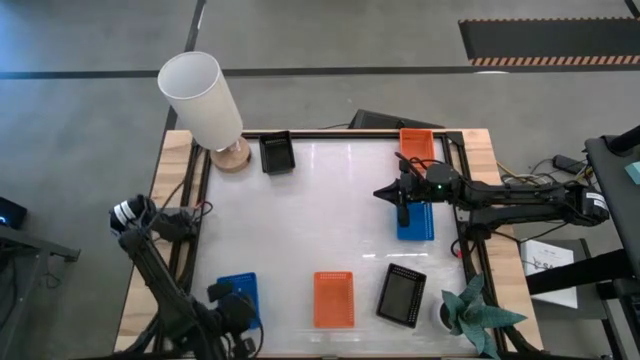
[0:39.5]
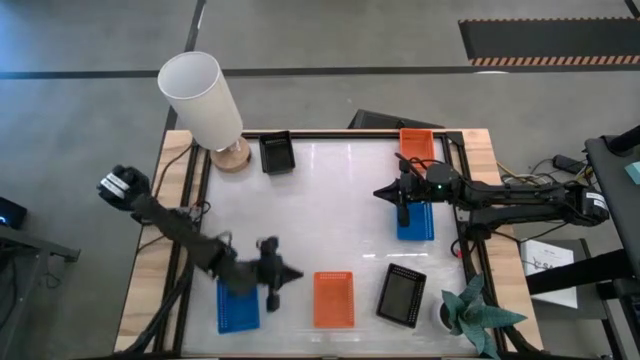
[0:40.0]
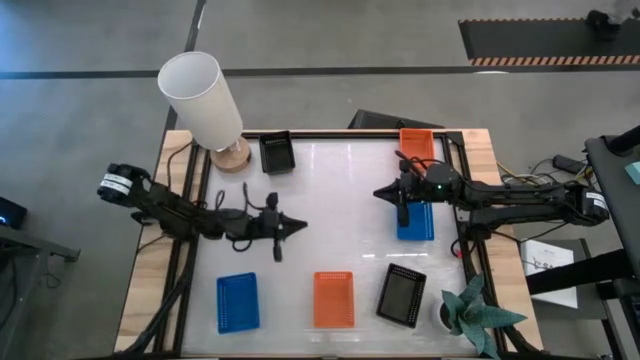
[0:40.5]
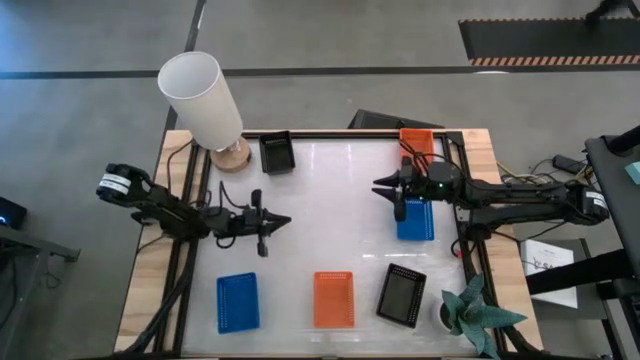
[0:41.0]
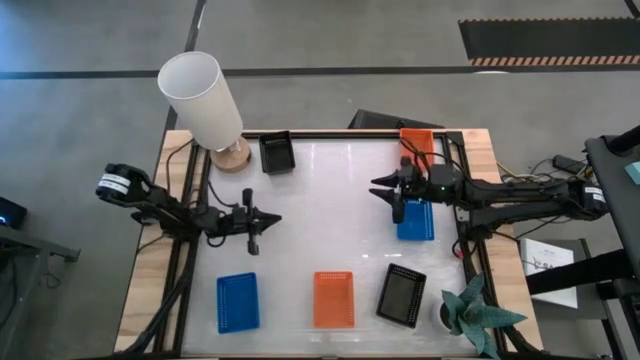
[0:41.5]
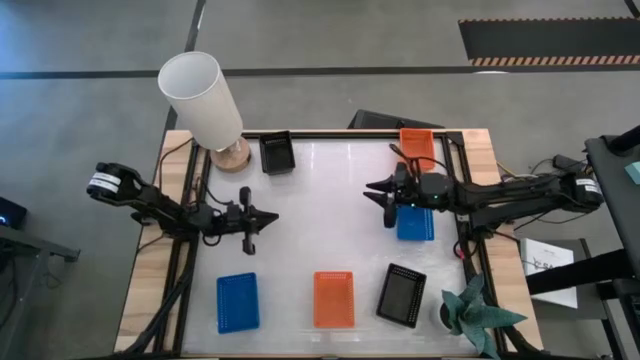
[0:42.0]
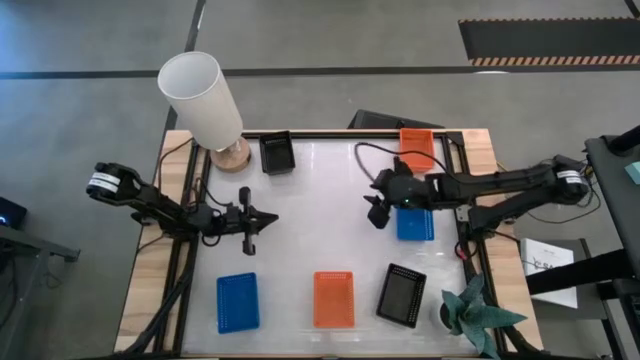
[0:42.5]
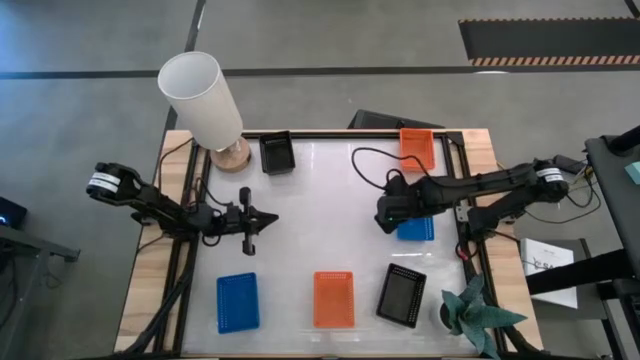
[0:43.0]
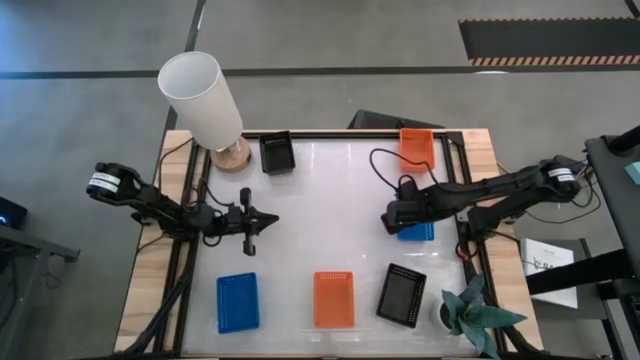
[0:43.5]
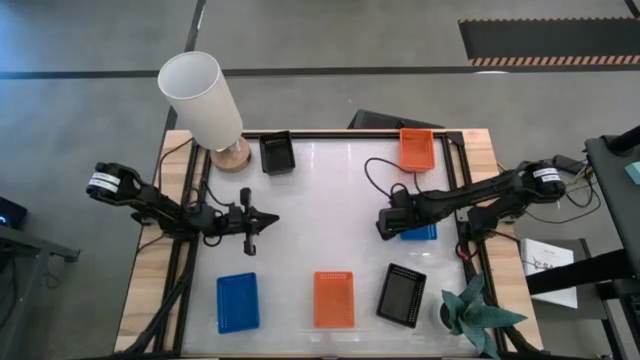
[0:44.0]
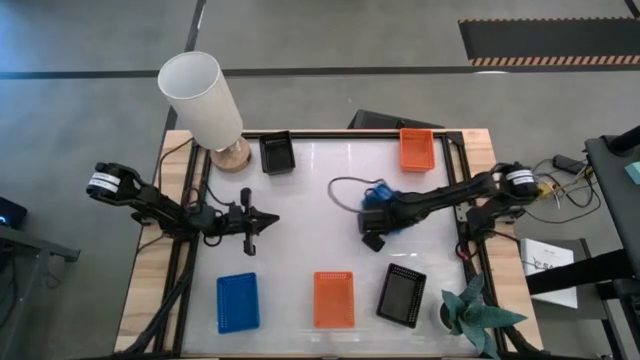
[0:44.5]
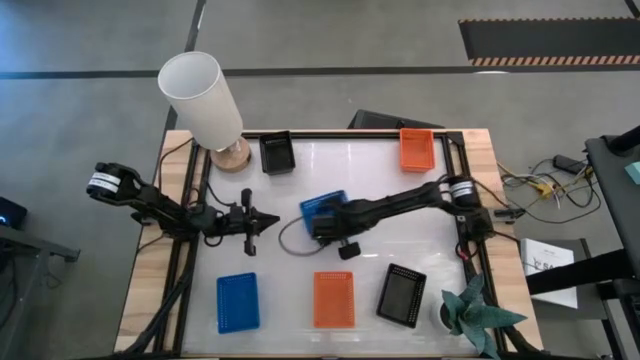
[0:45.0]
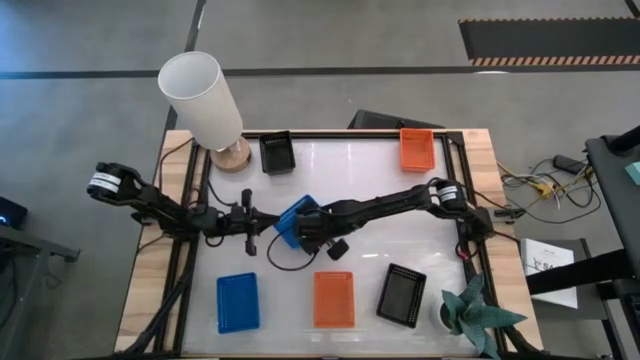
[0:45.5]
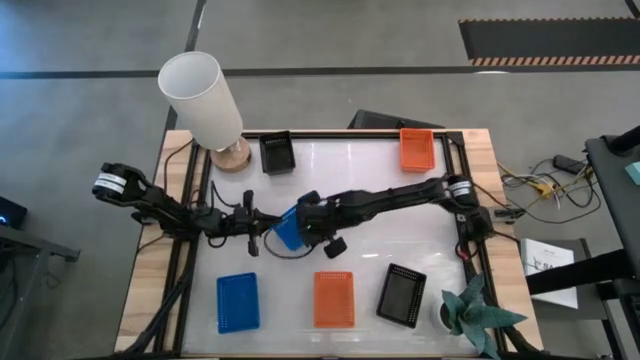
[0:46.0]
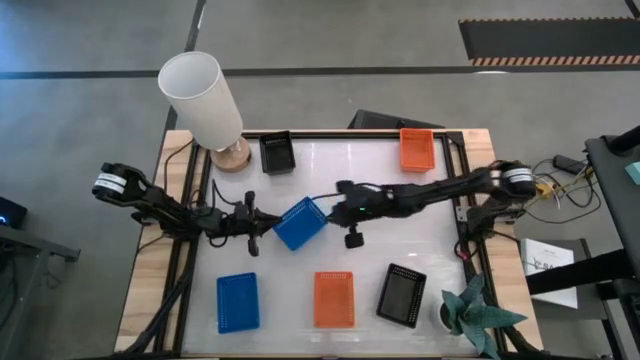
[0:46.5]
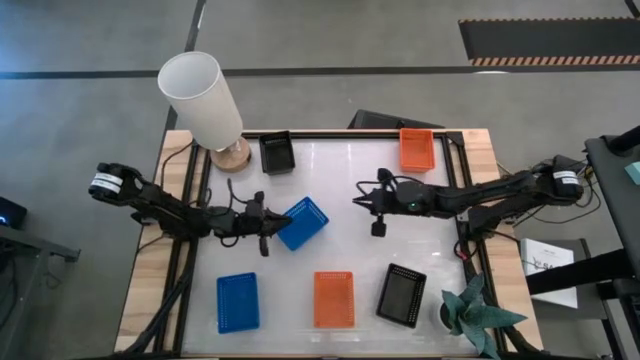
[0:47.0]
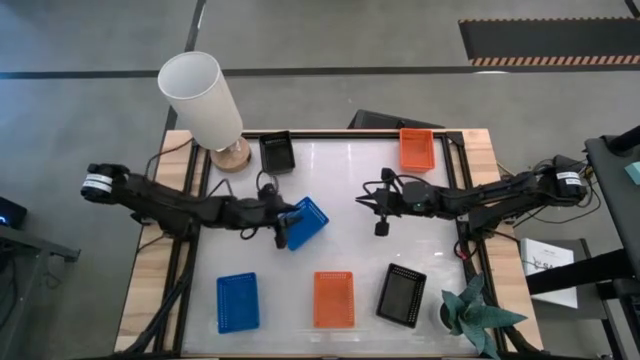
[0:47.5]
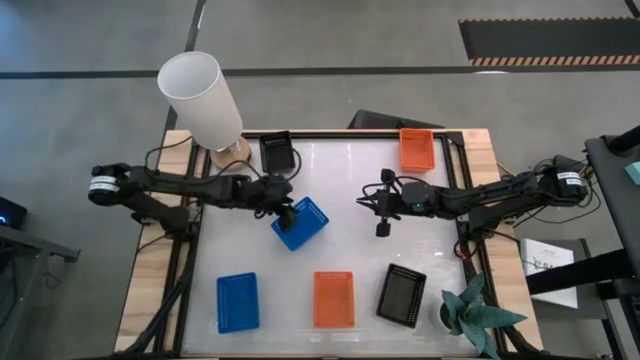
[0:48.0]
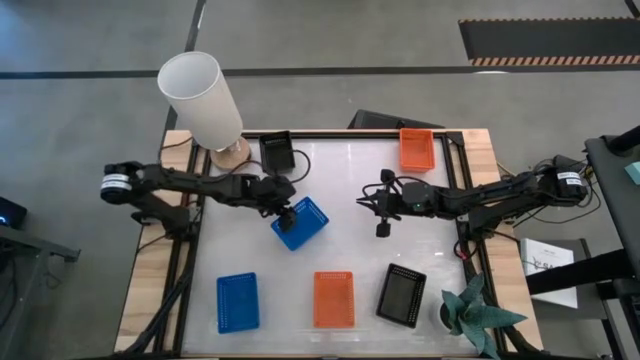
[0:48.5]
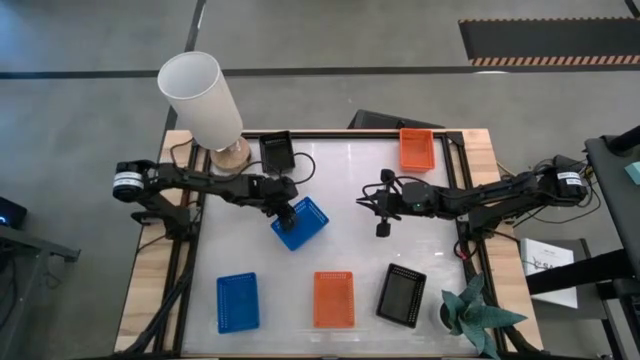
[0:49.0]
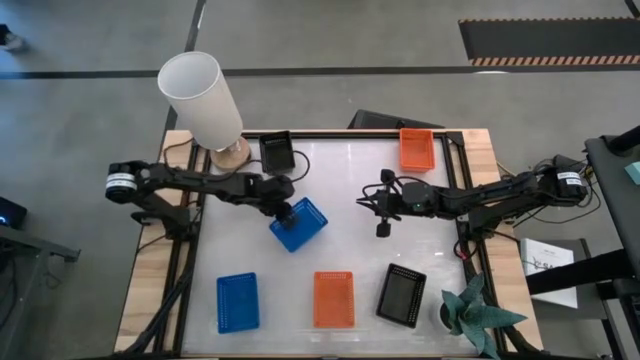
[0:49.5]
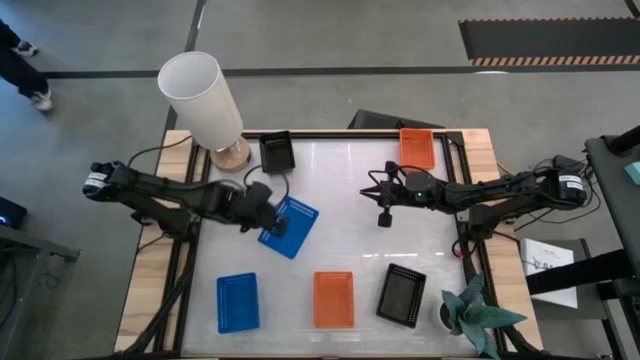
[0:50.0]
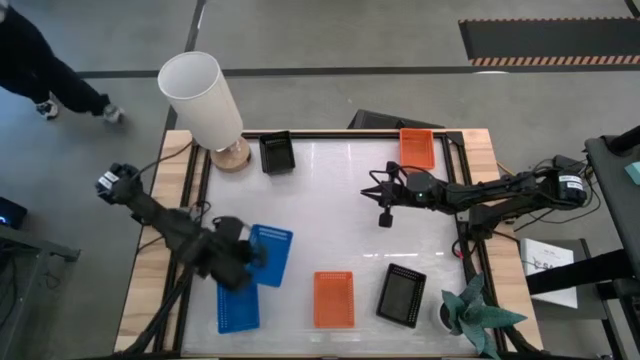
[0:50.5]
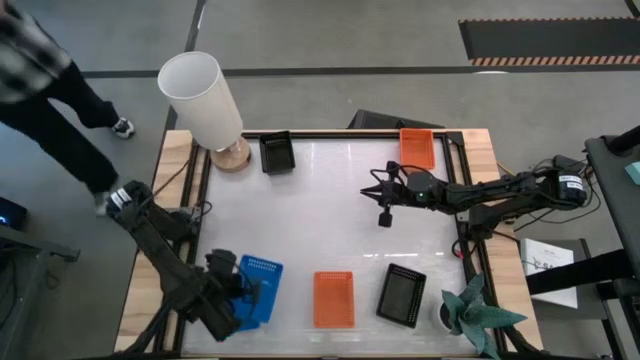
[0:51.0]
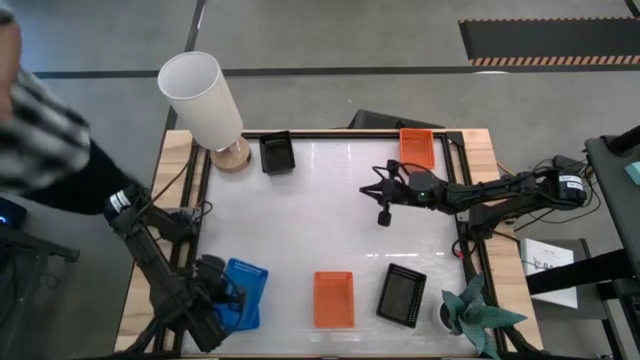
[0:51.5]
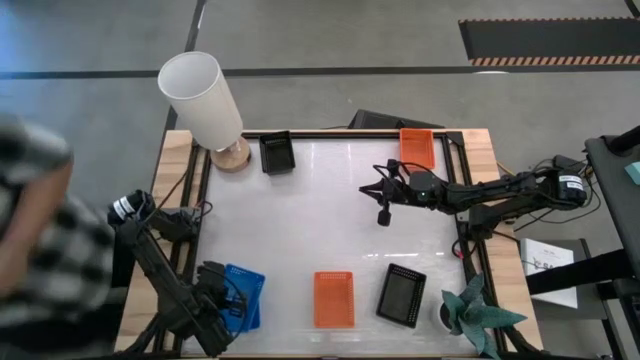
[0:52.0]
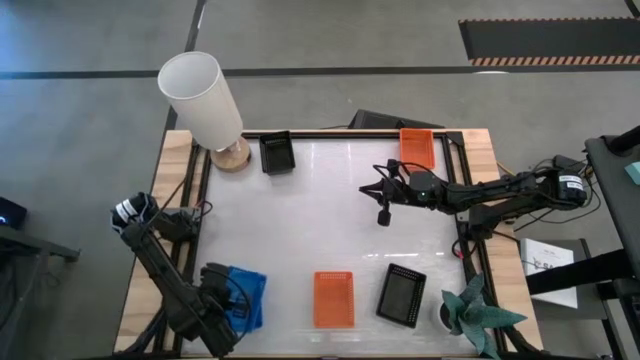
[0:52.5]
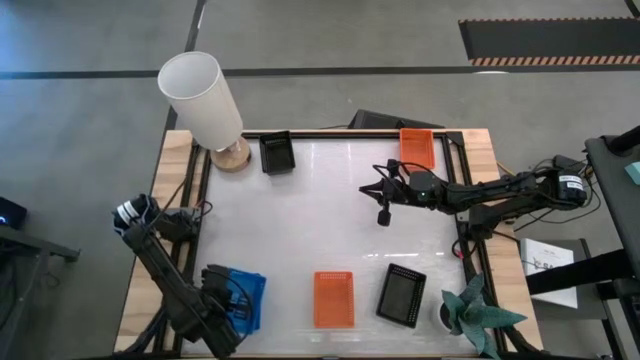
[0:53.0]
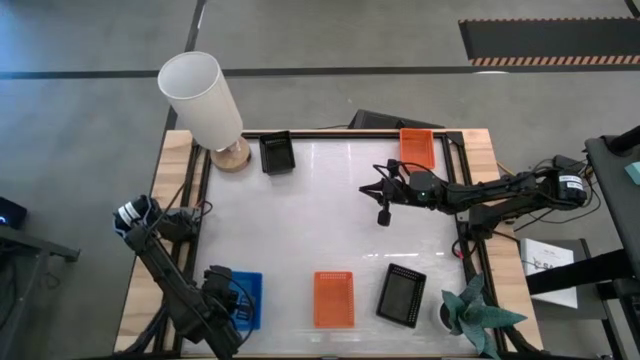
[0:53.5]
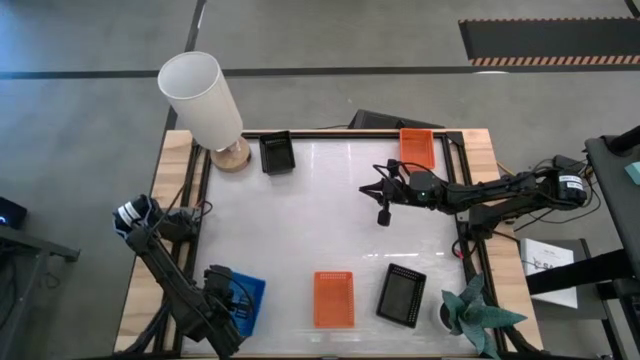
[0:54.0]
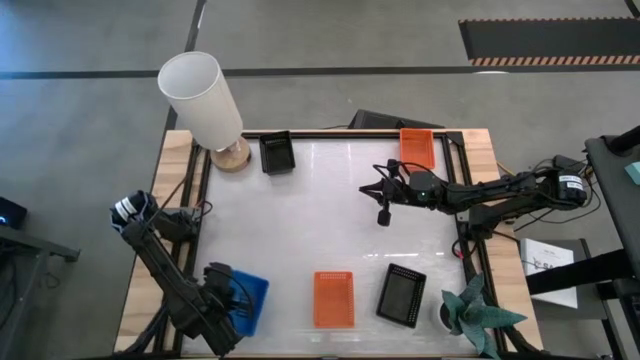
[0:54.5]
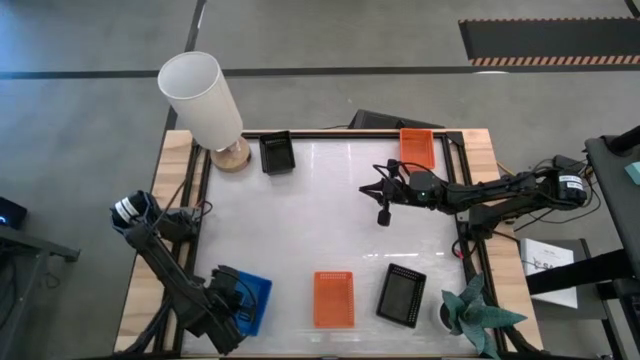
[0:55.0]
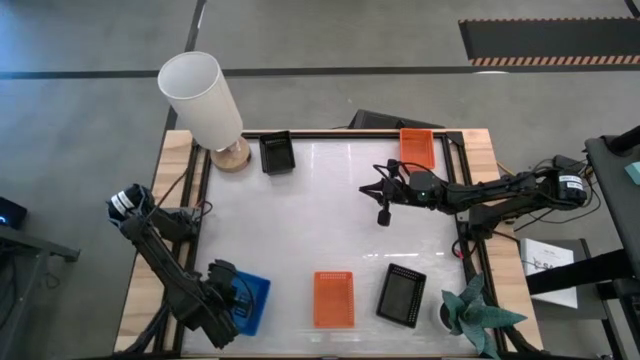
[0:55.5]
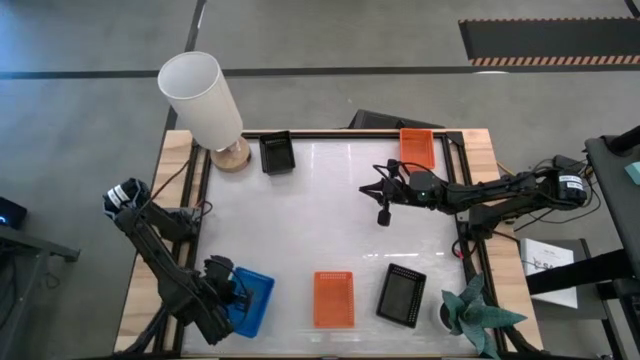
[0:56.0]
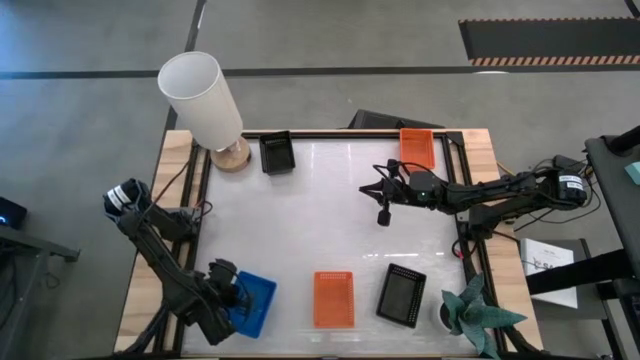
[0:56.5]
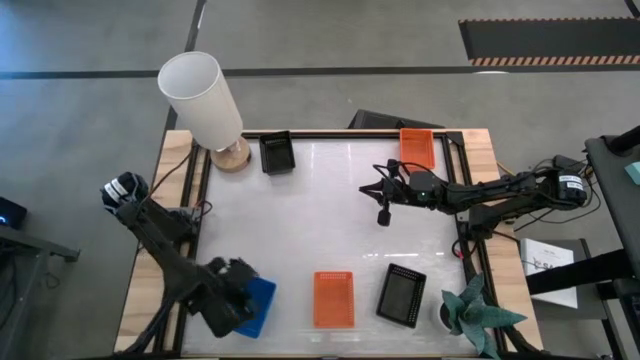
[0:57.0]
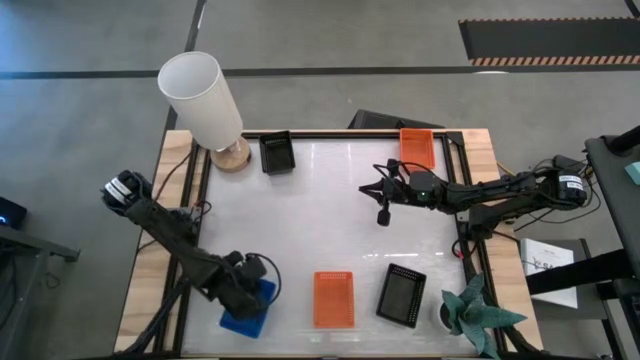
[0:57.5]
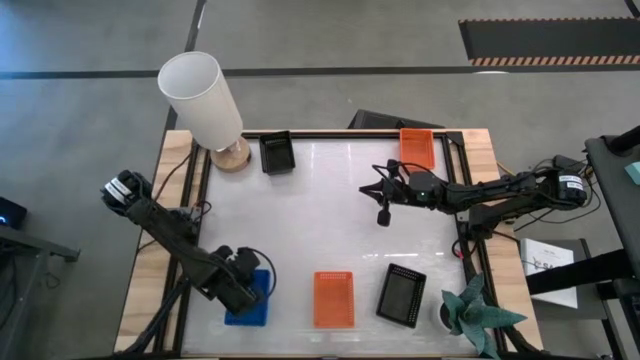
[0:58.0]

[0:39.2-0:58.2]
Stack the right blue bin on top of the bottom blue bin

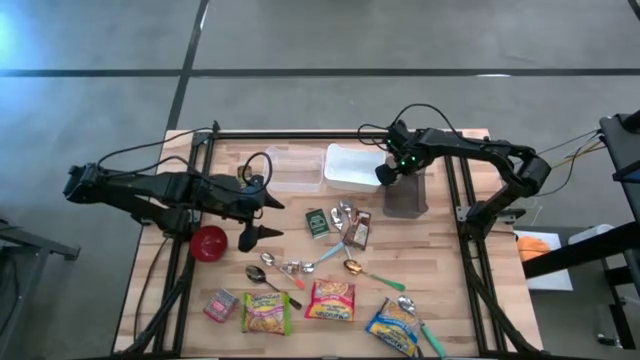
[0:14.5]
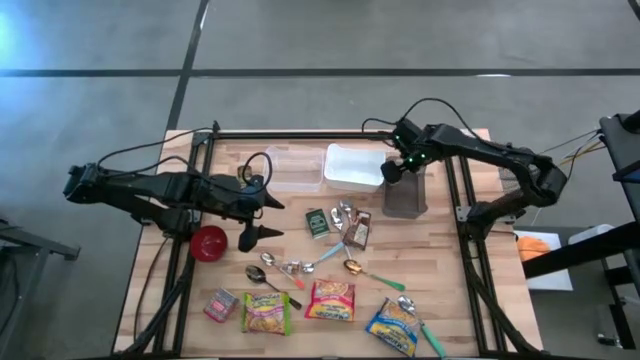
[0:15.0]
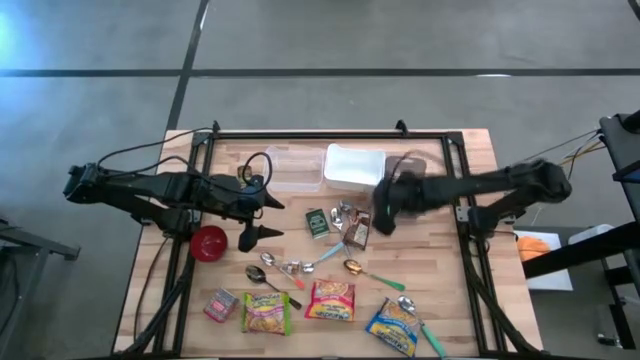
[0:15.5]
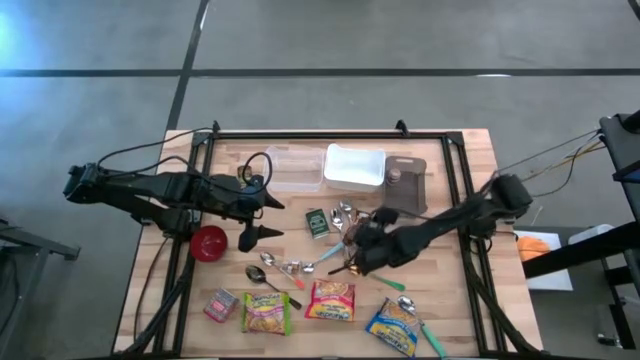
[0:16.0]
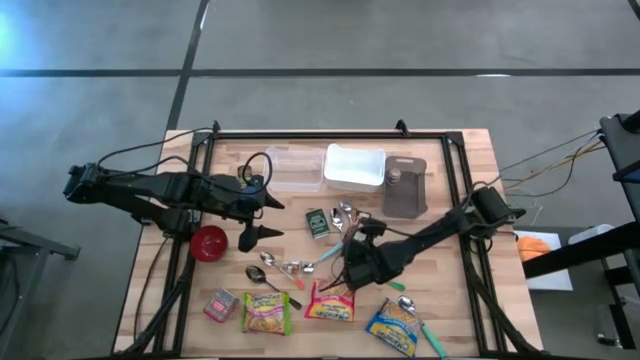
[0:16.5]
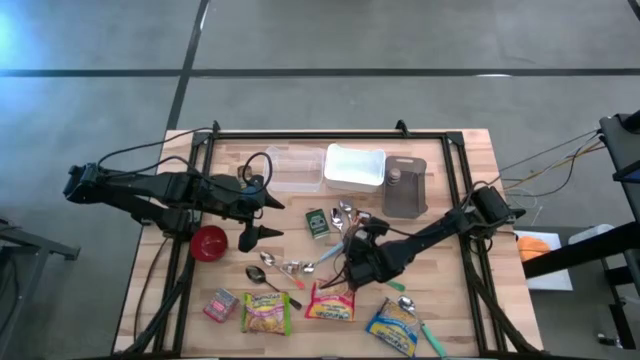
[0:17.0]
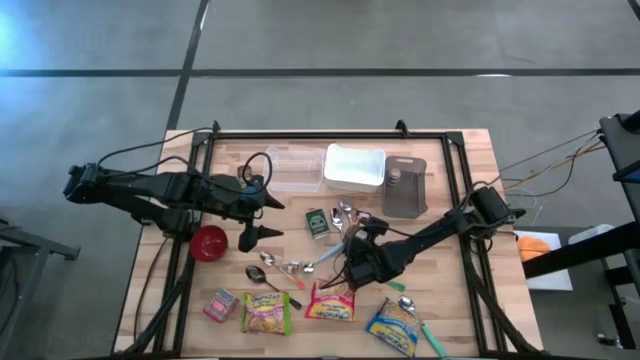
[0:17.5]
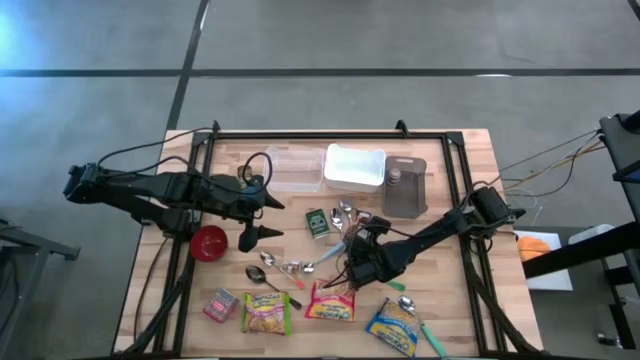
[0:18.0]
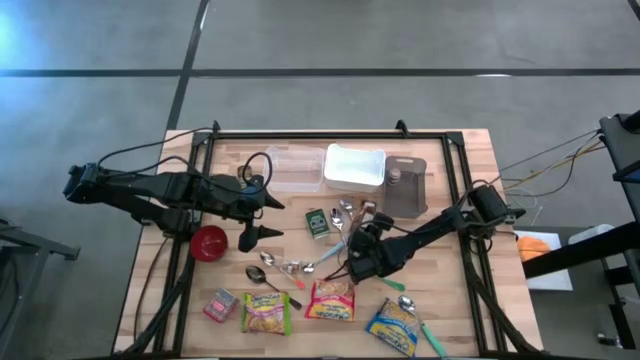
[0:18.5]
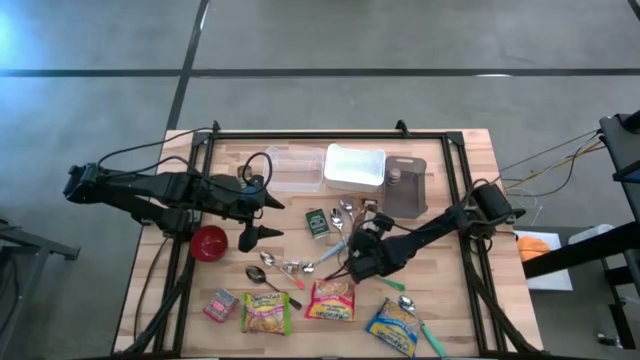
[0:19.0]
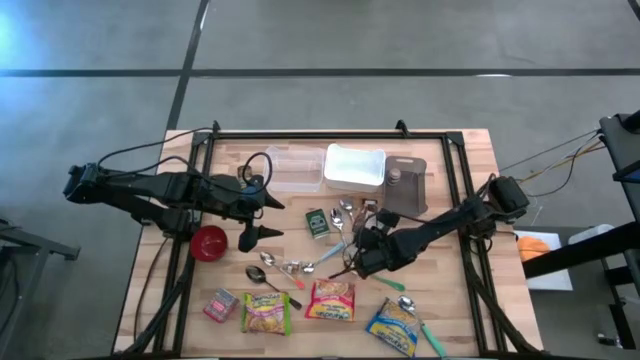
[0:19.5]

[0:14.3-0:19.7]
Put the orange seasoning bag into the black bin
